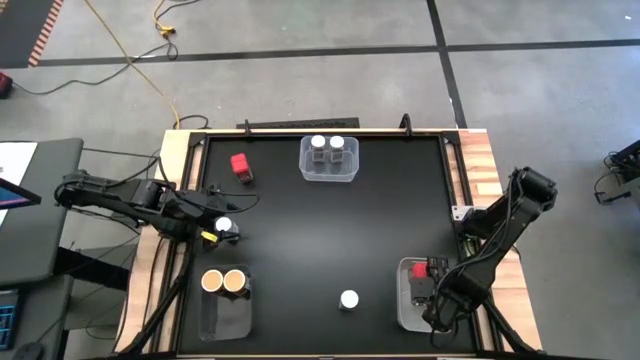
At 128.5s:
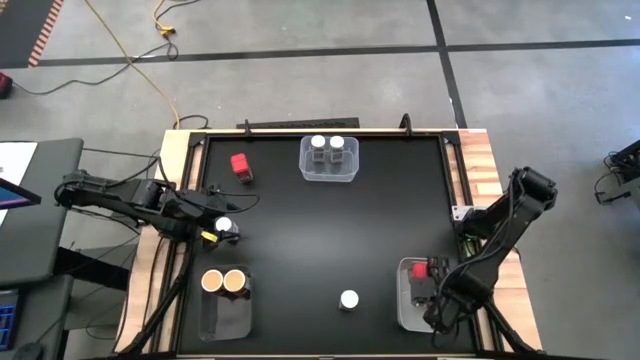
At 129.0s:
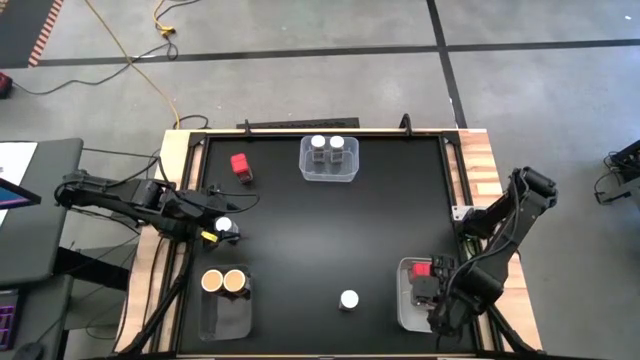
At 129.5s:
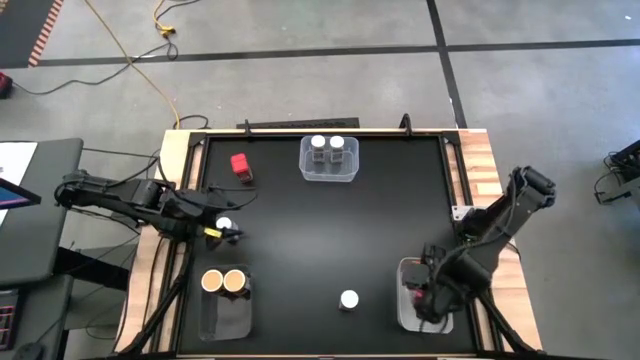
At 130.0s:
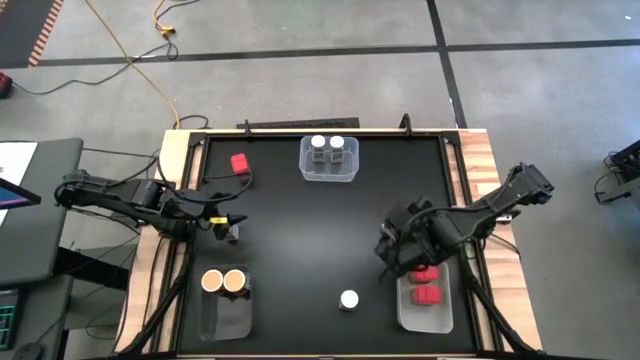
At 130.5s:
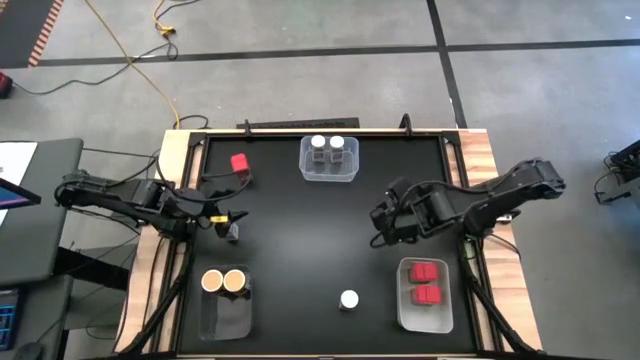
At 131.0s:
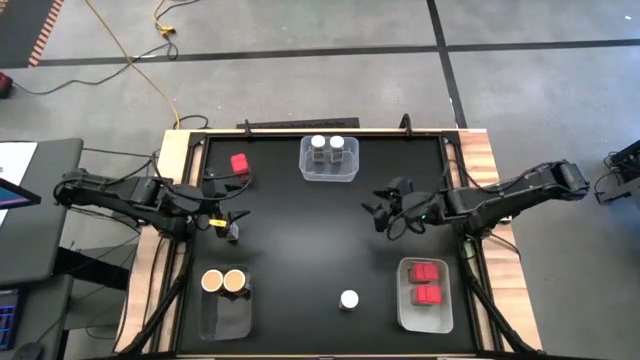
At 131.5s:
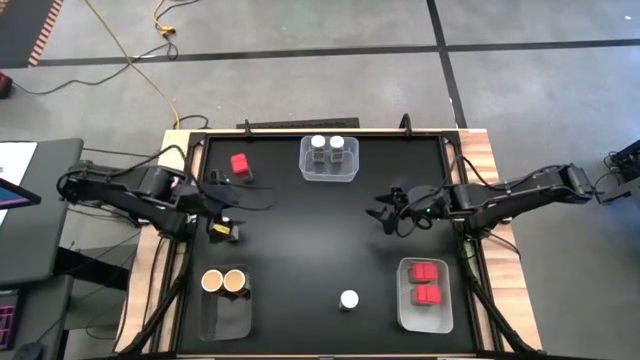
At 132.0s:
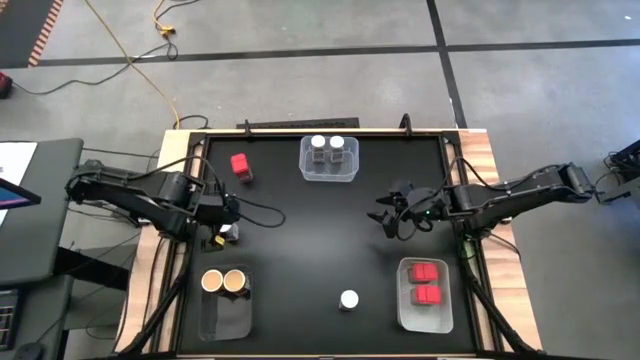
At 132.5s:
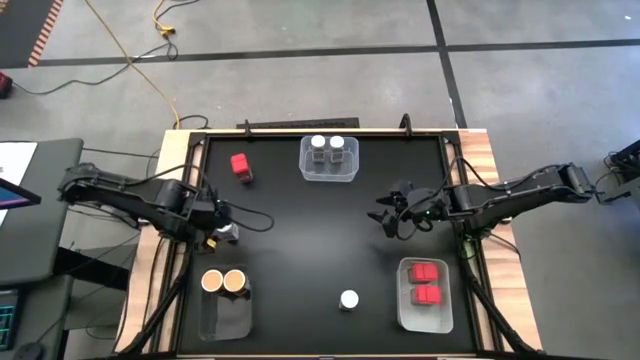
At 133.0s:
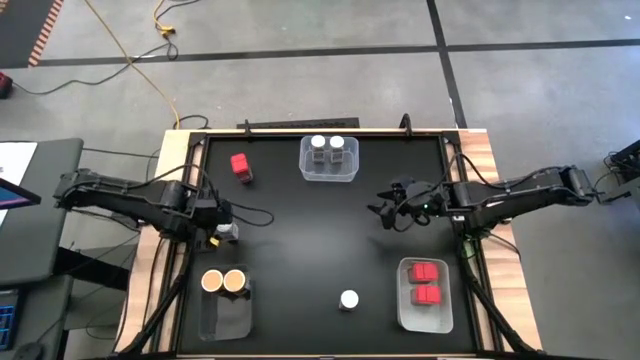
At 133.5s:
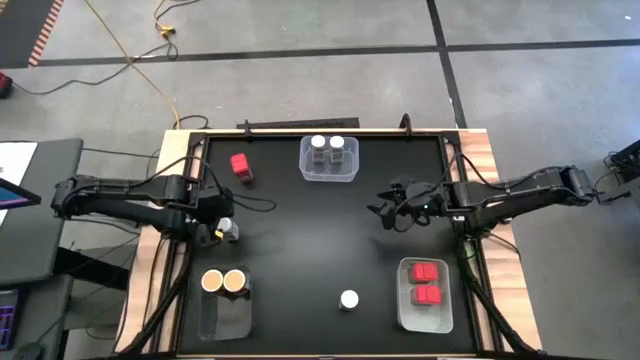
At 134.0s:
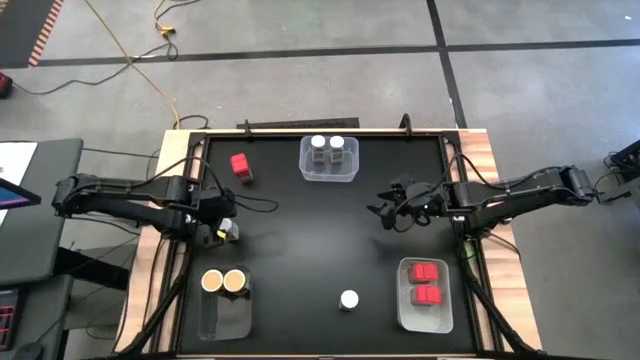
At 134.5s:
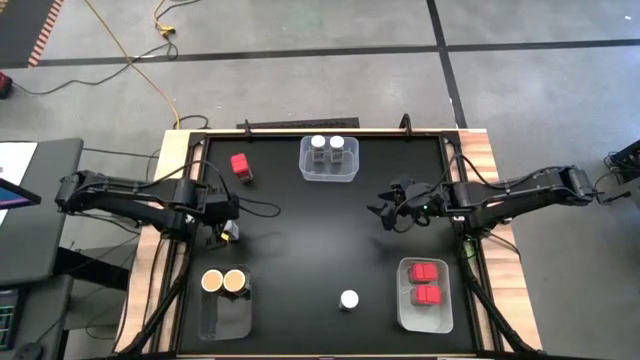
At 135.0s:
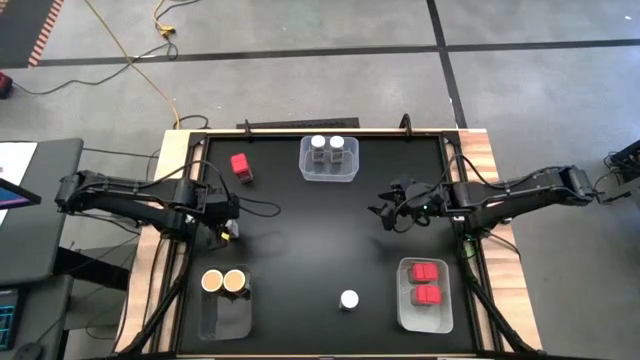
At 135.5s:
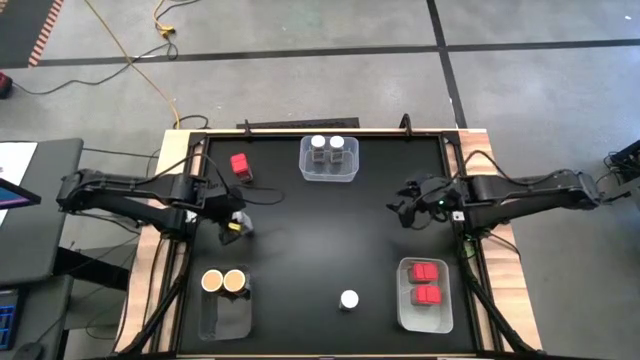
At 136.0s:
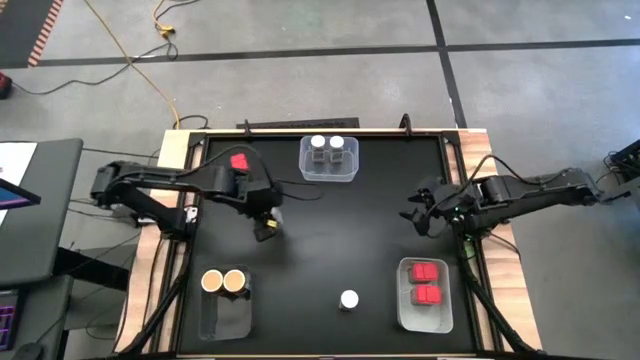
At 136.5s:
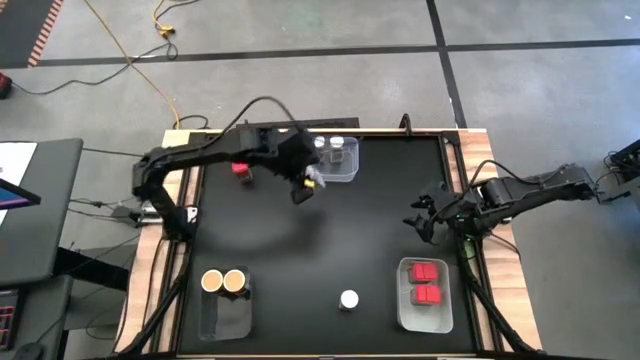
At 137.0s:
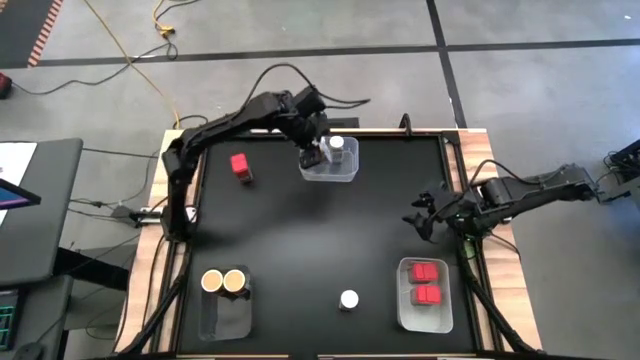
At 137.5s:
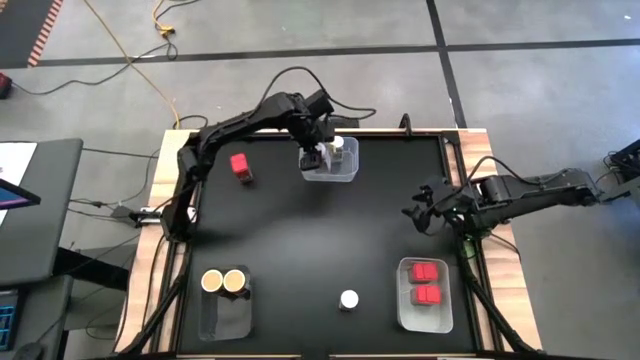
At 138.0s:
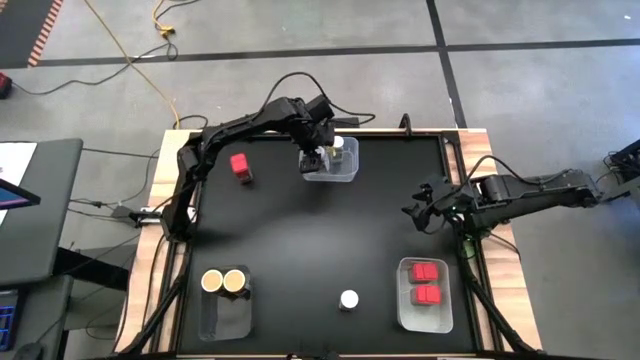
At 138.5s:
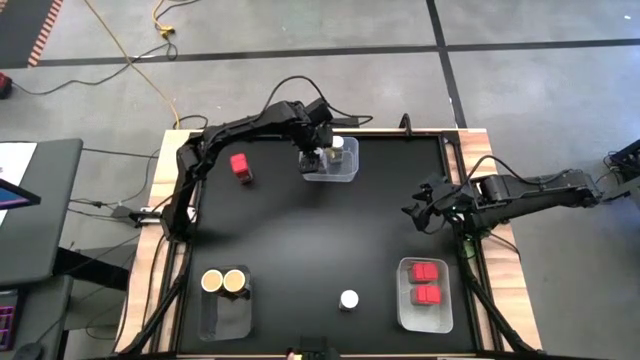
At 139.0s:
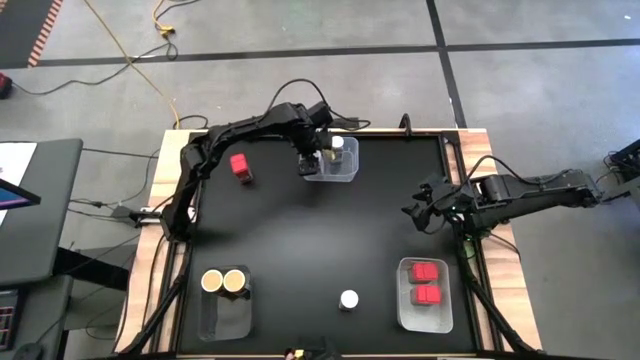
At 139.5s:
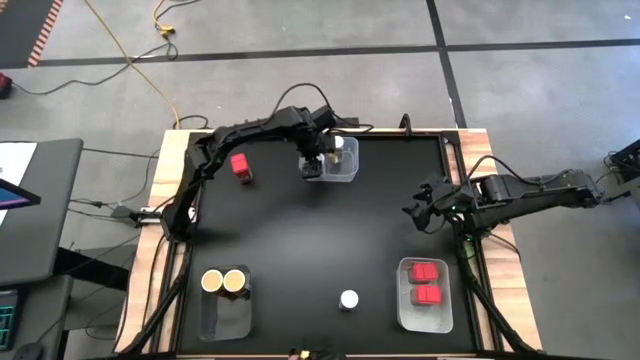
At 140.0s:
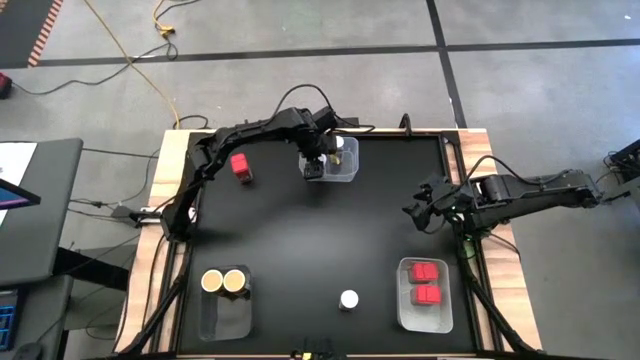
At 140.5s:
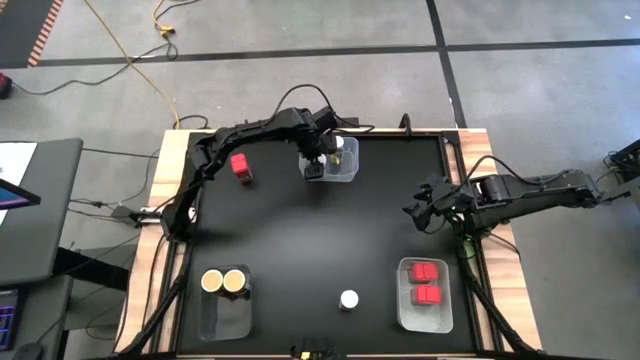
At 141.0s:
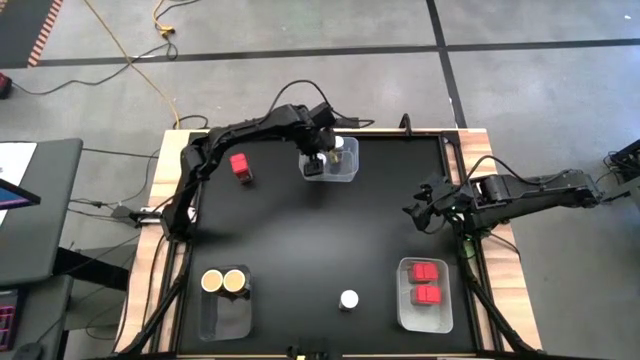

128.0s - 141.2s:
Task: Sort spices by type
Put the left white spice bottle into the transparent bin

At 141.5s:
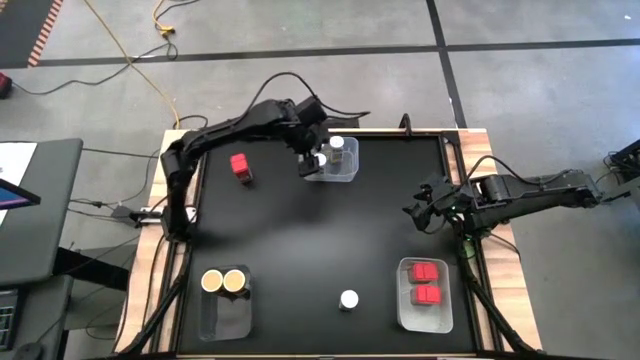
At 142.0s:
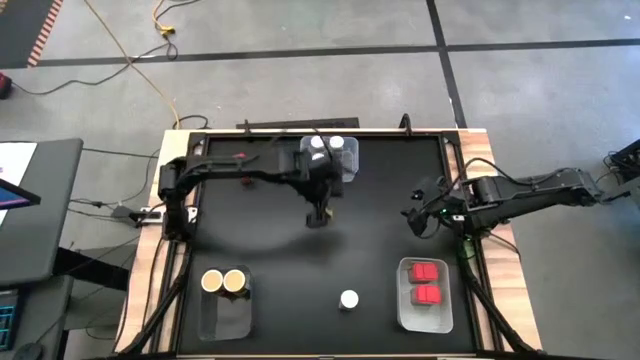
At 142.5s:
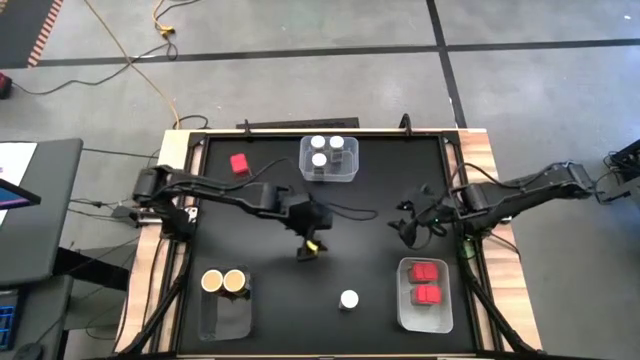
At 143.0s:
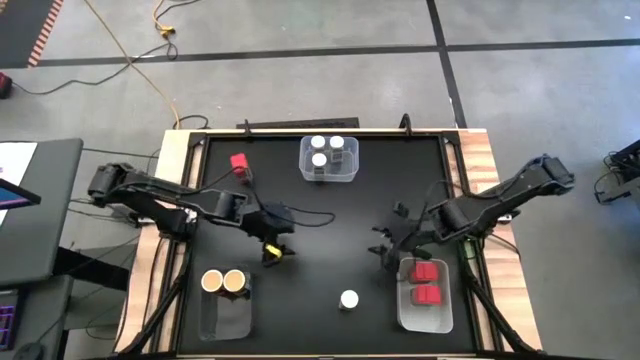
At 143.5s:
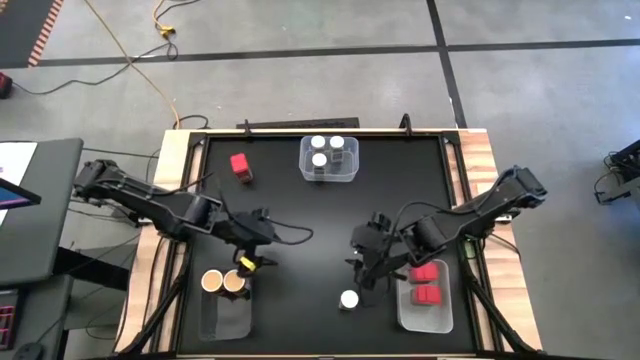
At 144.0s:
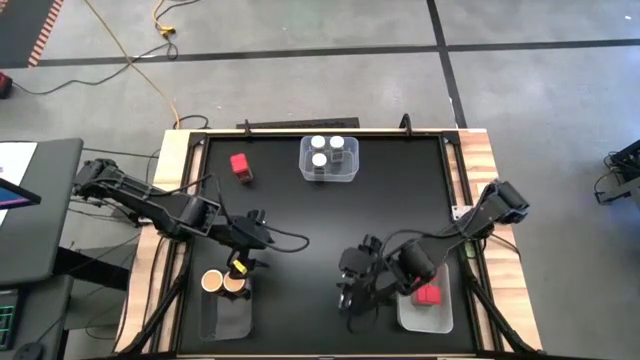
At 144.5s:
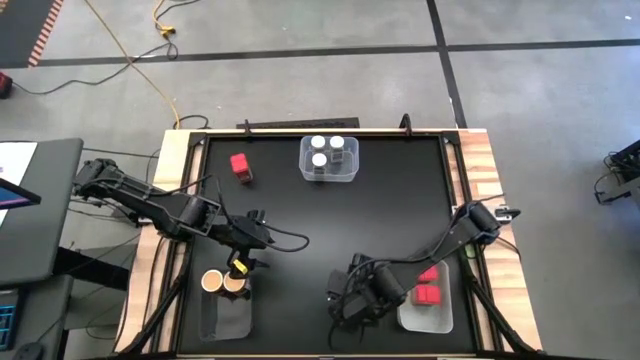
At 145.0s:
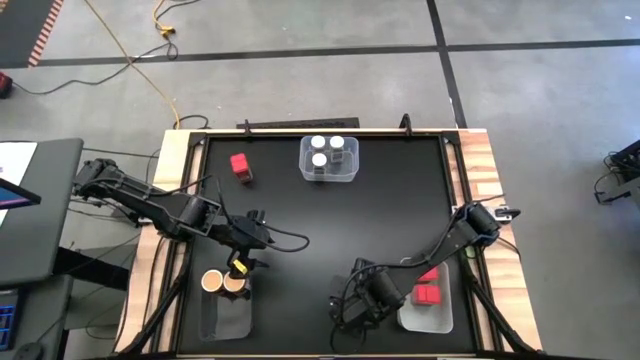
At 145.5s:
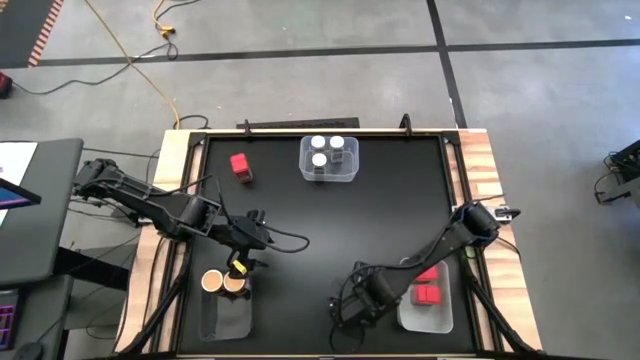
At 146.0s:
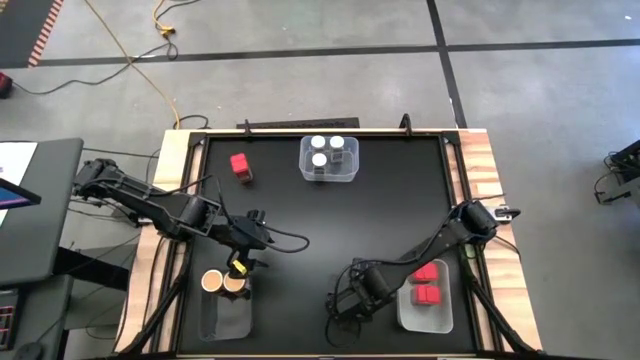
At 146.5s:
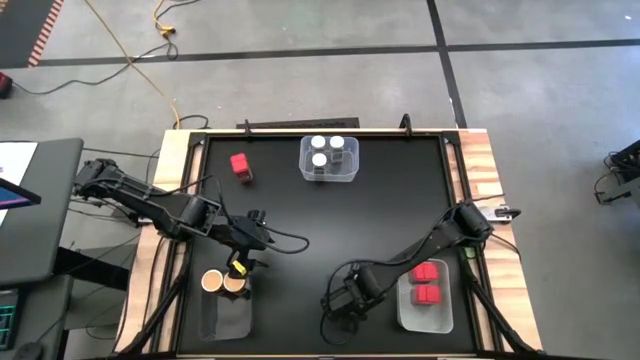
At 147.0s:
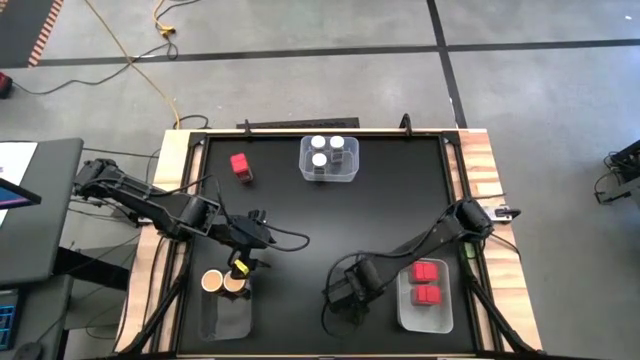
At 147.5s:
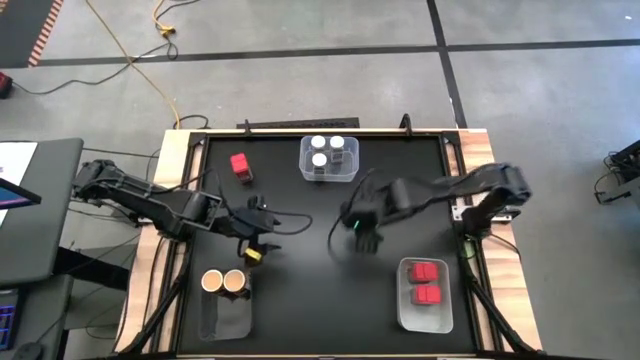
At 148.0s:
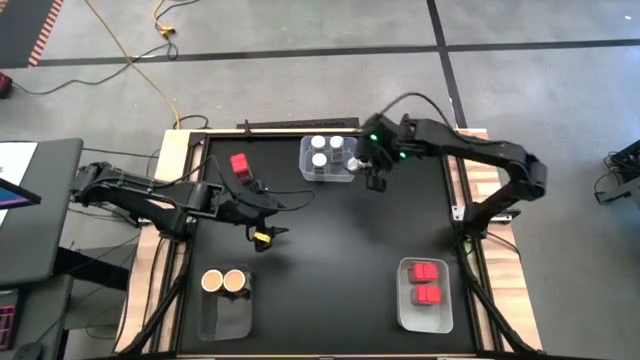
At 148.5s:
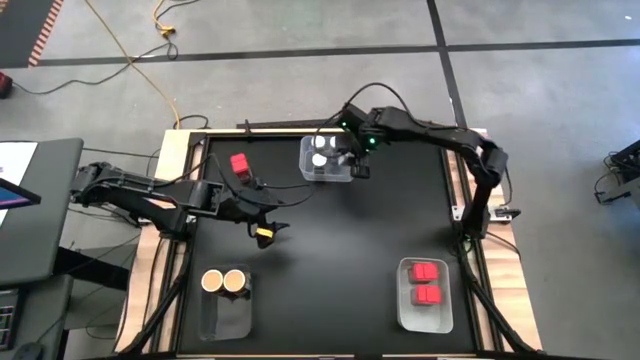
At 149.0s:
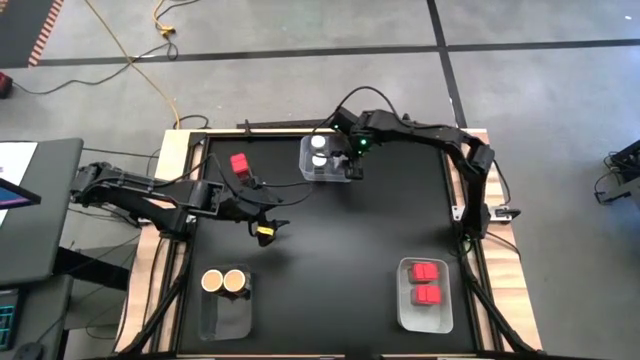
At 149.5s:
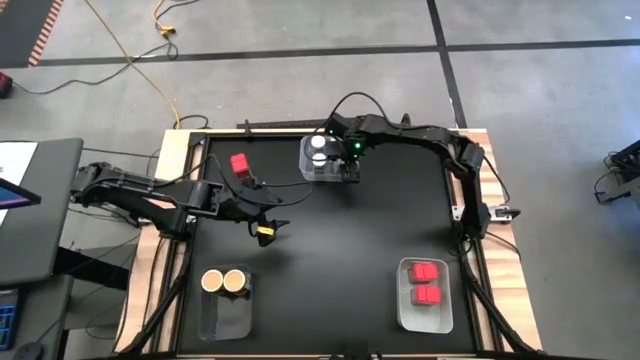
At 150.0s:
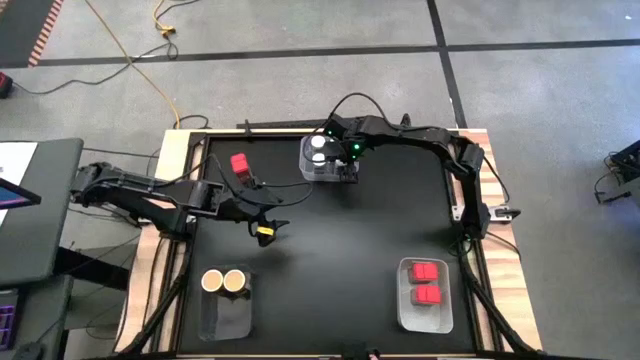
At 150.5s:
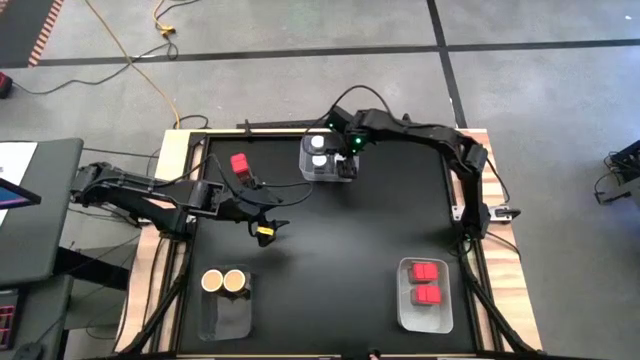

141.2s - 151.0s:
Put the white spice bottle into the transparent bin
